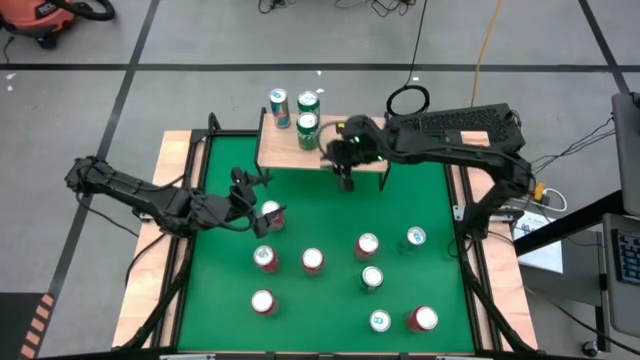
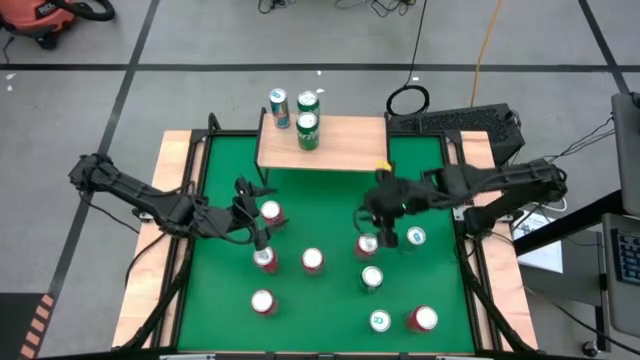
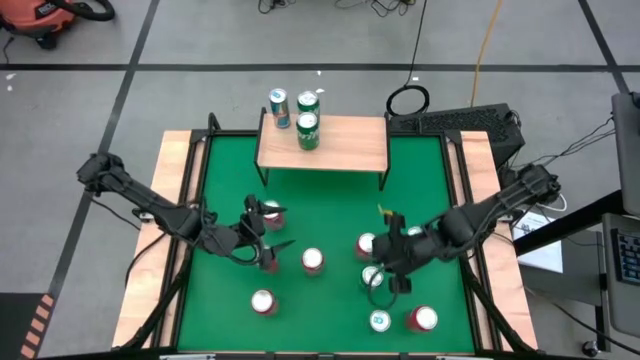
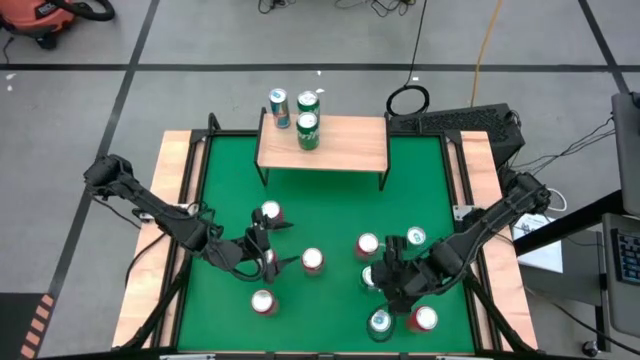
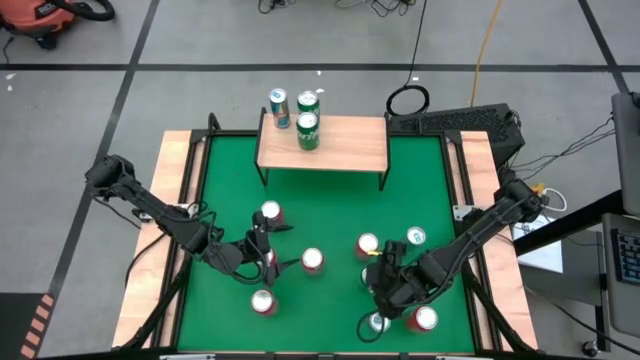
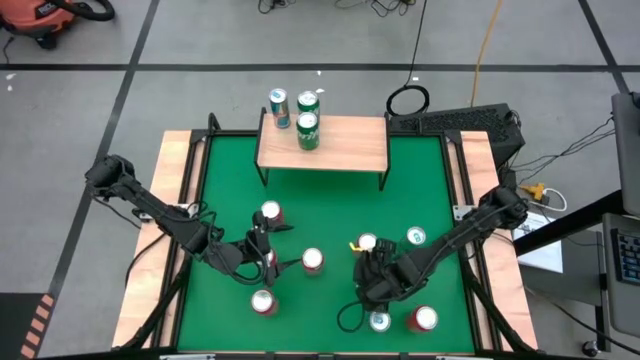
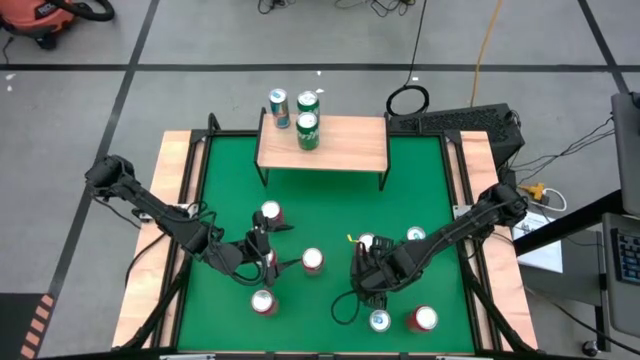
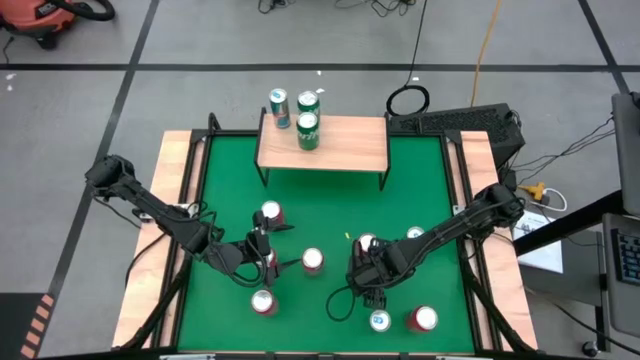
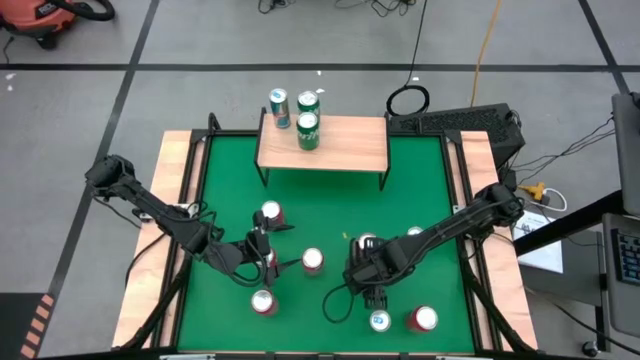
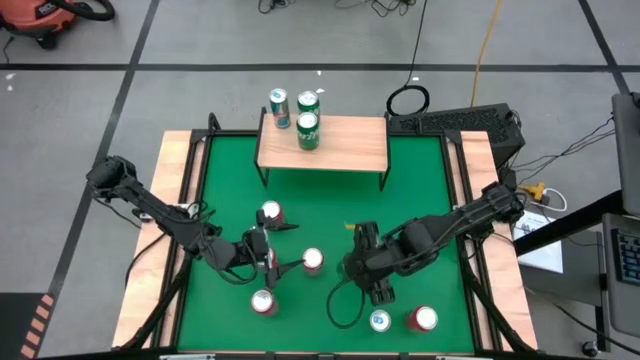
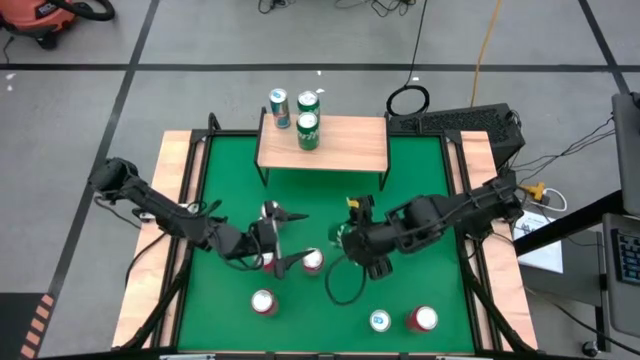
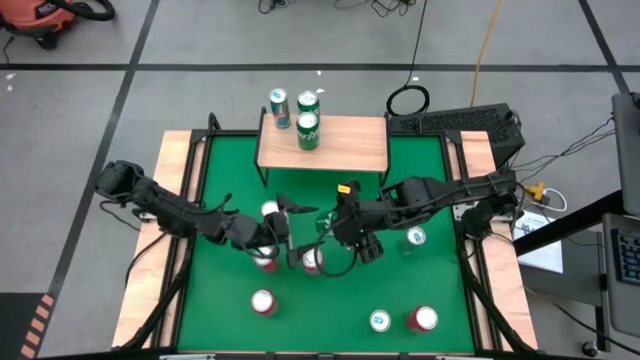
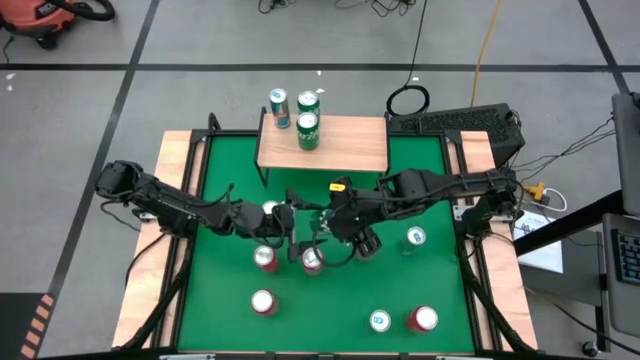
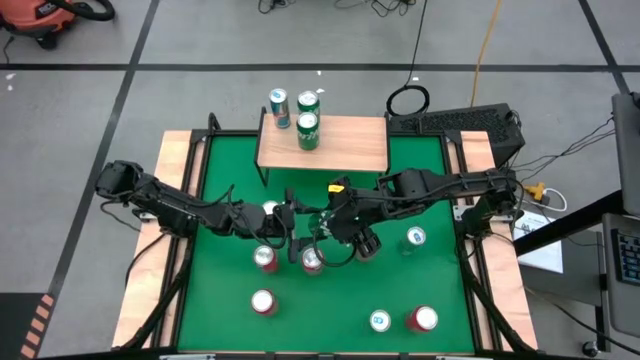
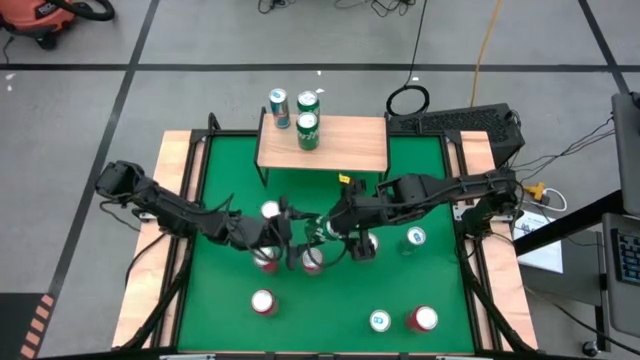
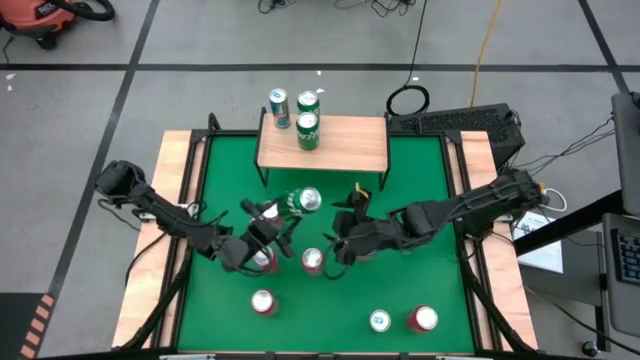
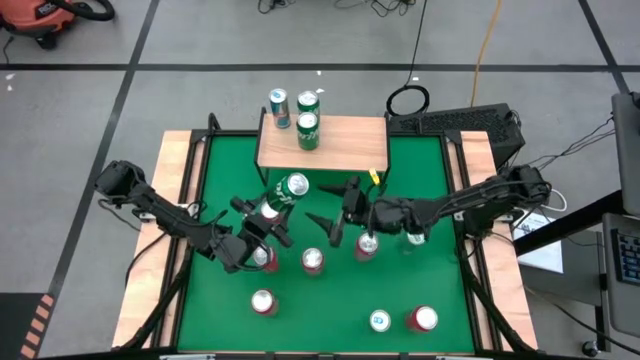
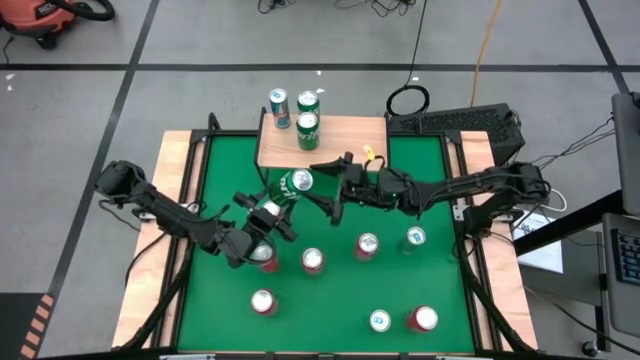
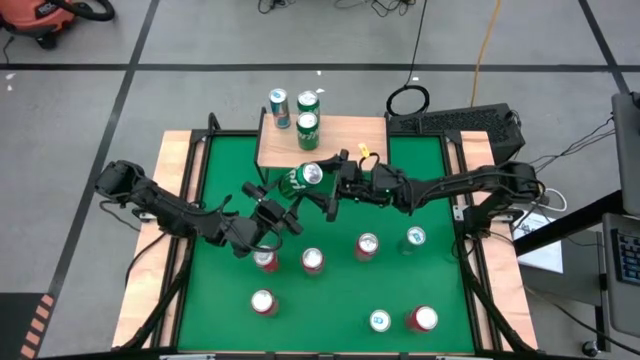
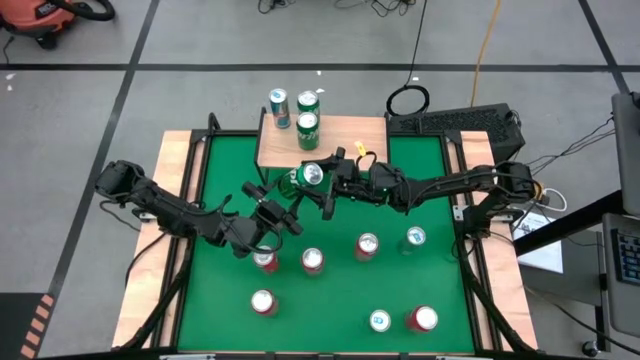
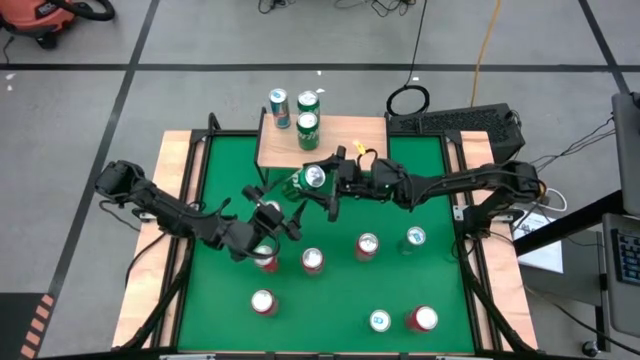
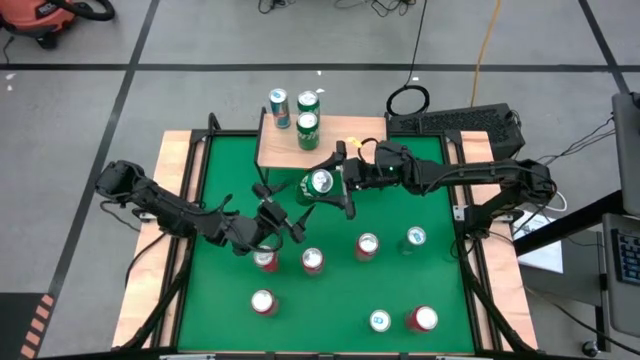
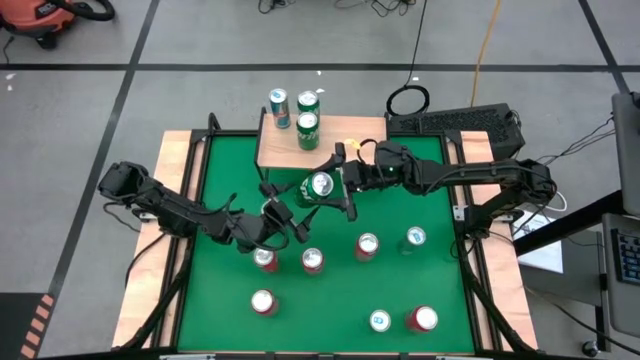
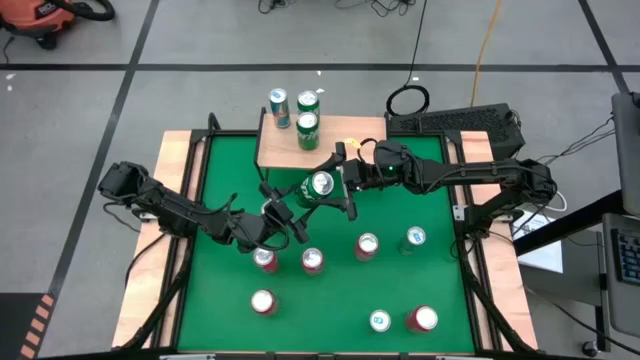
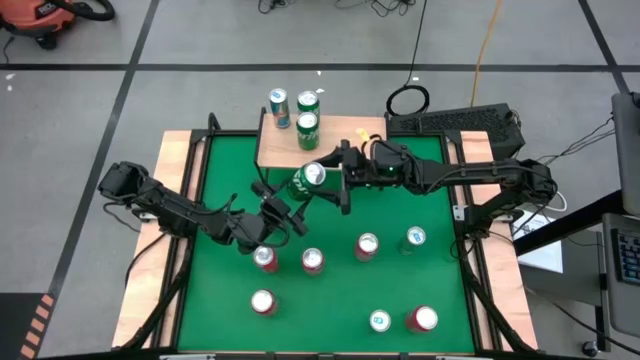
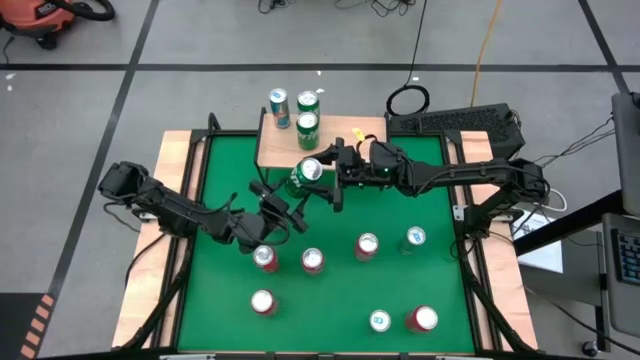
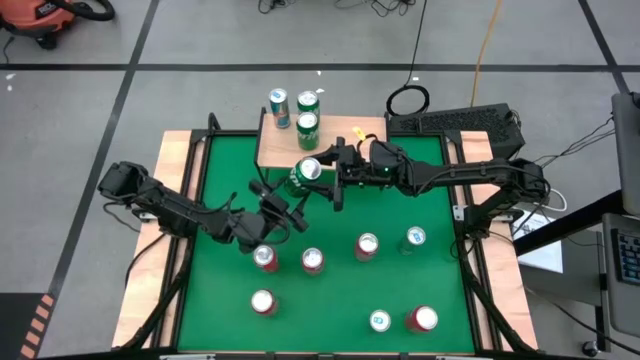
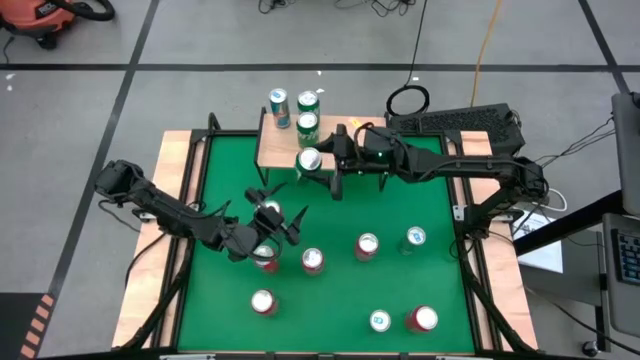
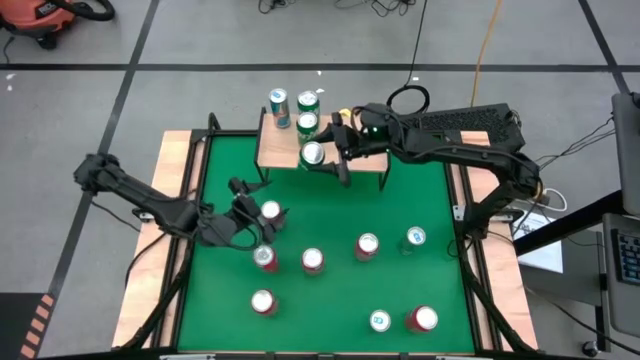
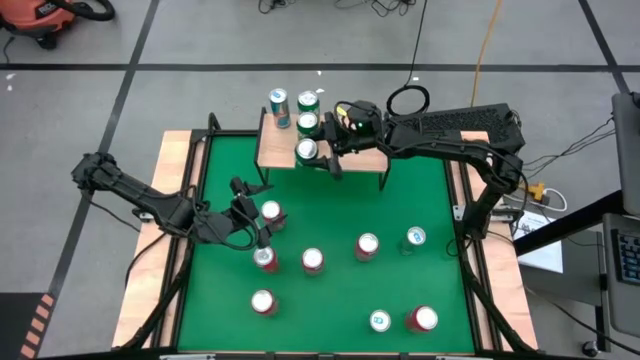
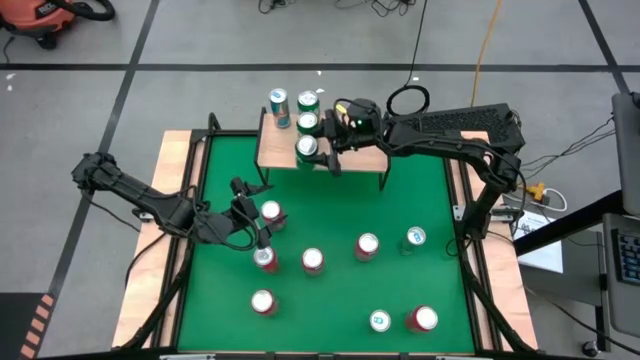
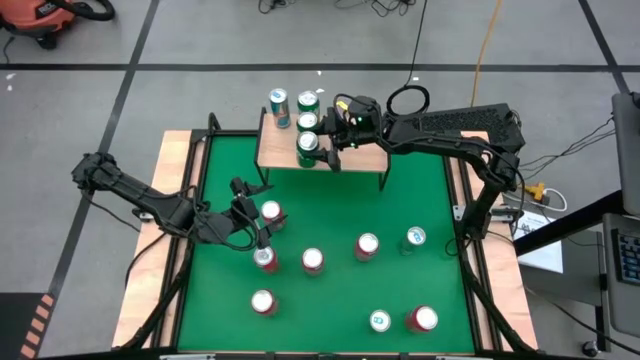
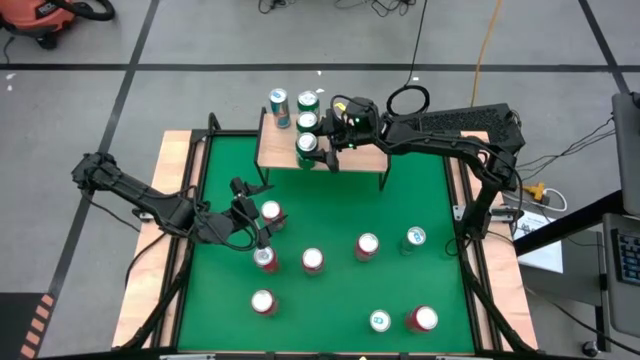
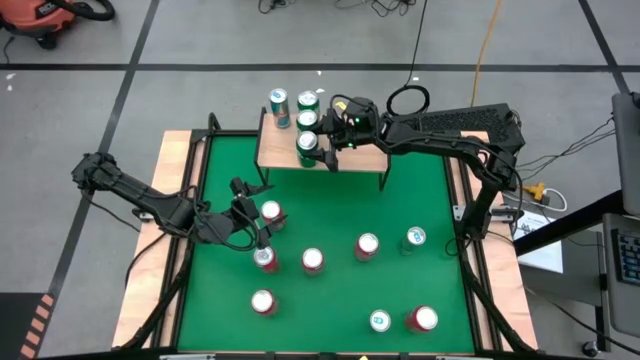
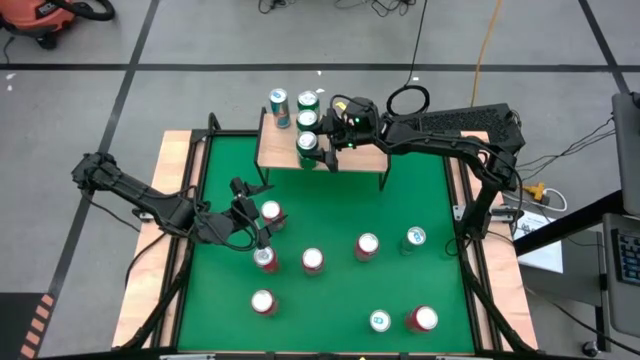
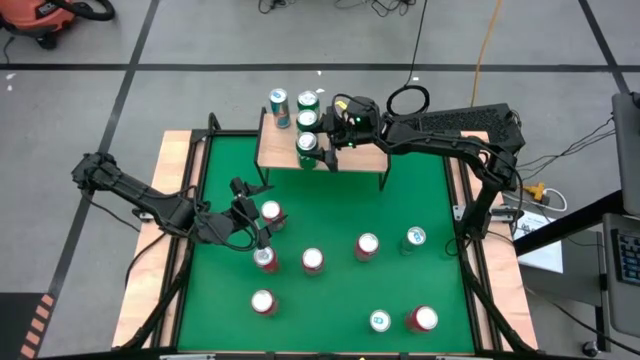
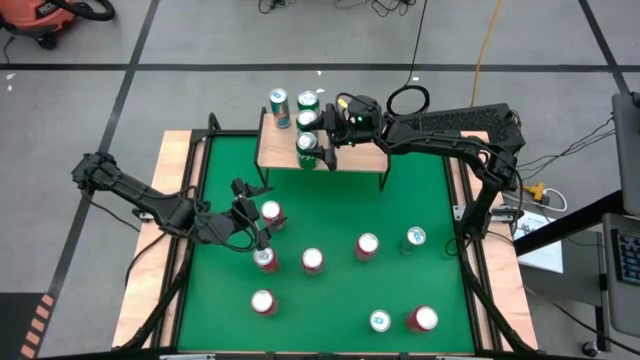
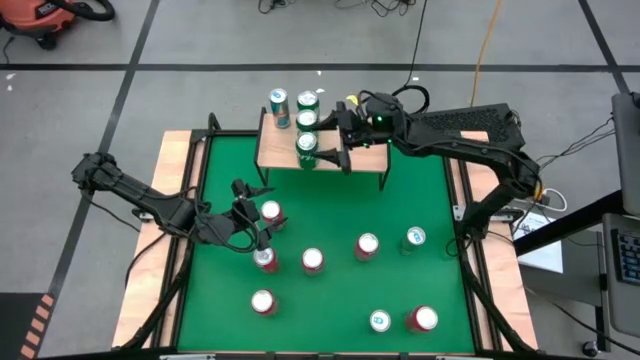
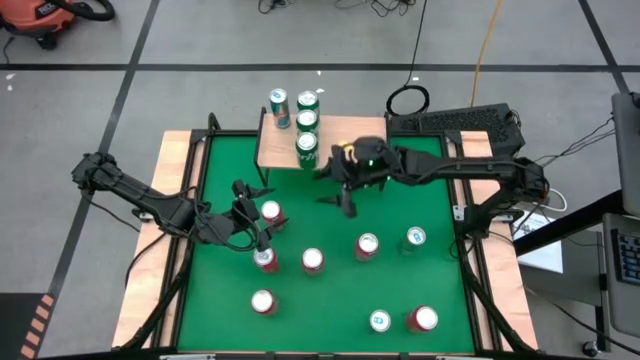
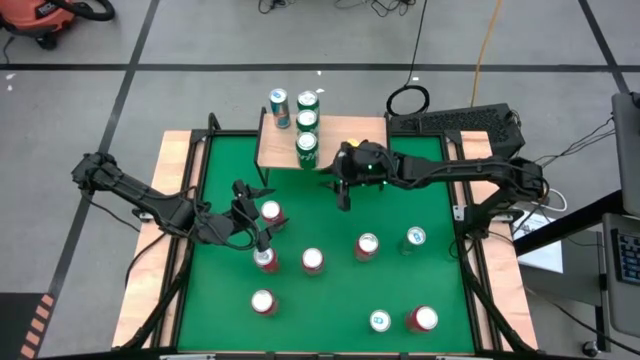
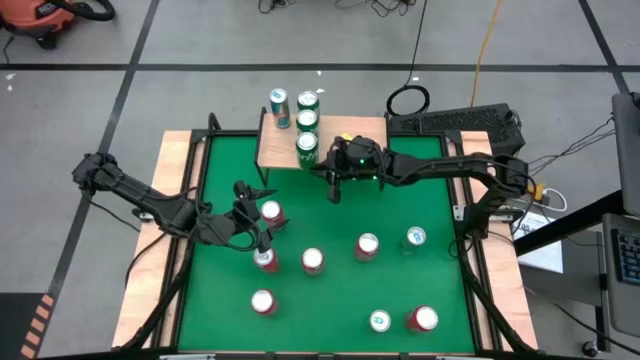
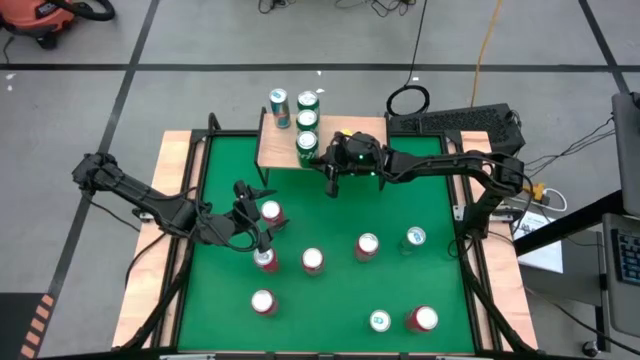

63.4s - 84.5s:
Task: Place canned beverage on shelf
Put the green soda can on the shelf aligned with the other green soda can

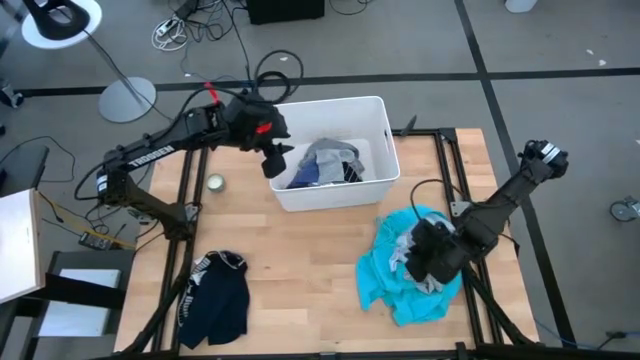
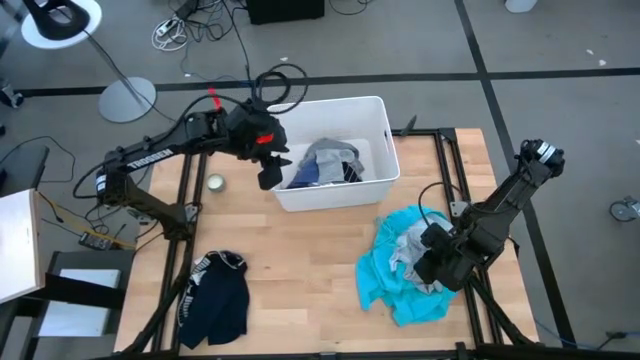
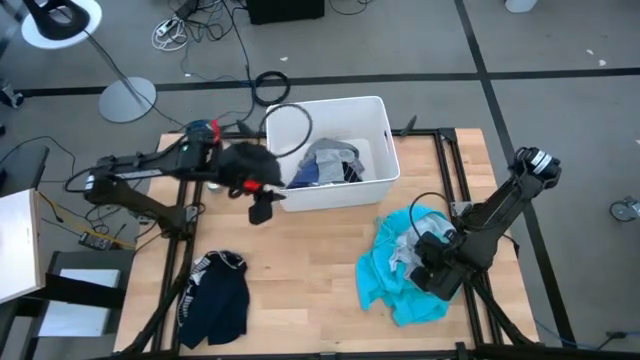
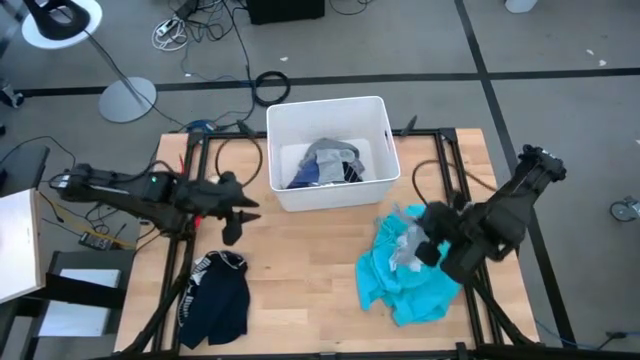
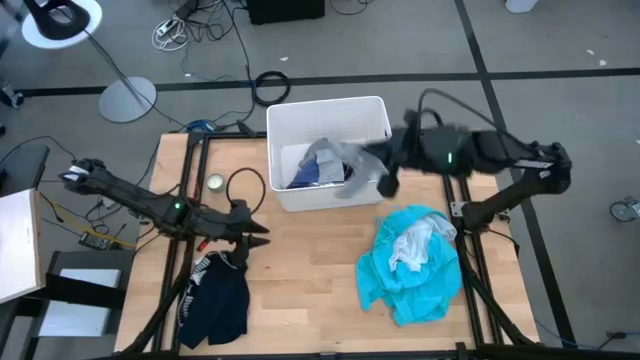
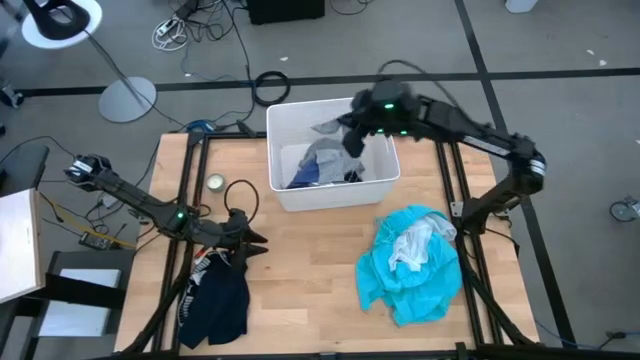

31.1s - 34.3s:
Task: Sort clothes
Put the gray sock into the white laundry organizer
